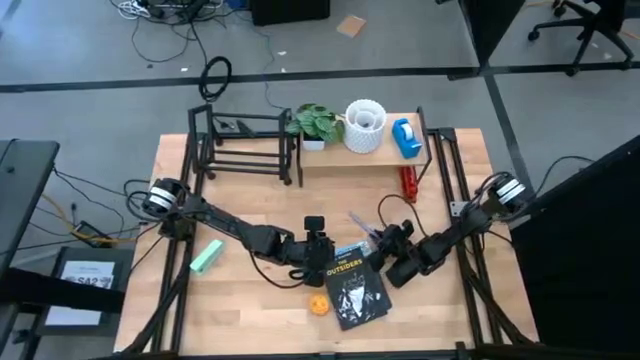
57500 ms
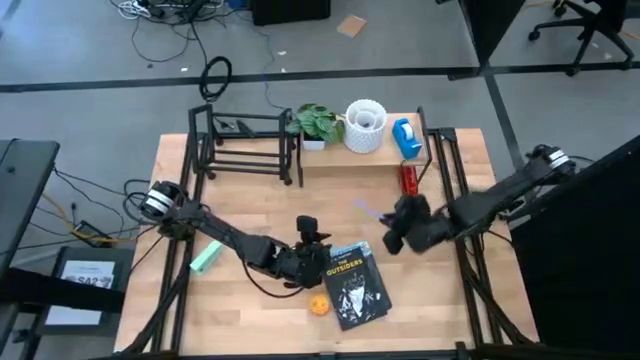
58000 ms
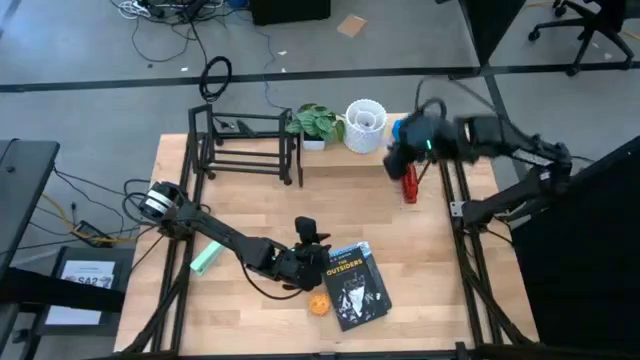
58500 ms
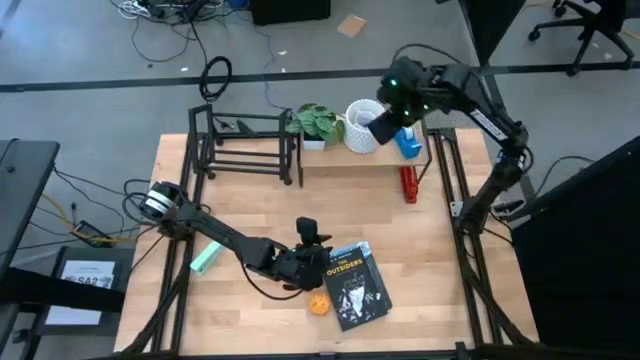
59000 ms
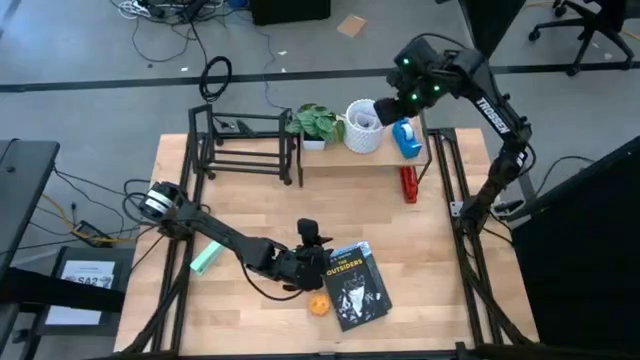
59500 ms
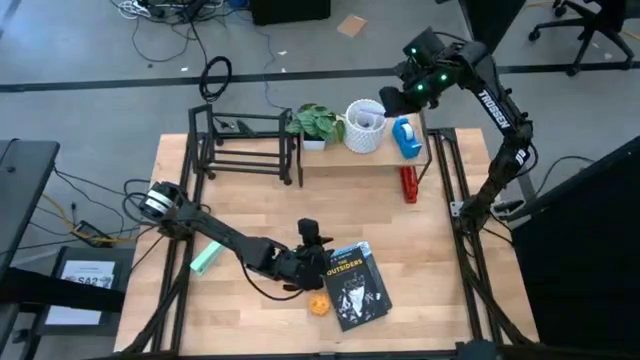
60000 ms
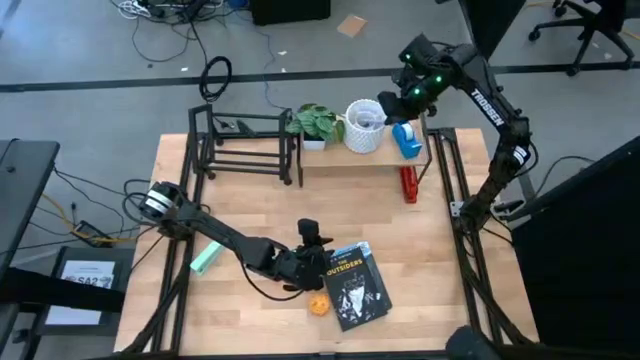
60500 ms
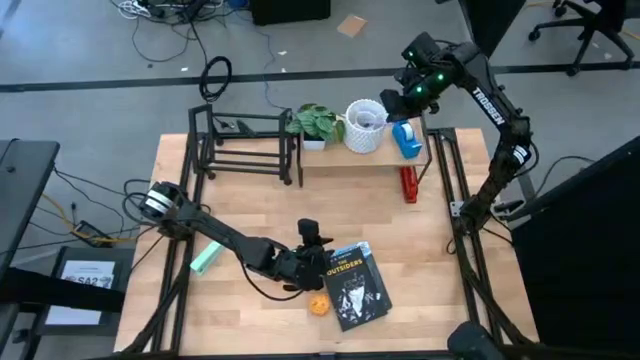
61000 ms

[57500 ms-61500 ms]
Task: Stock shelves
Put the purple pen into the white pen organizer on the shelf

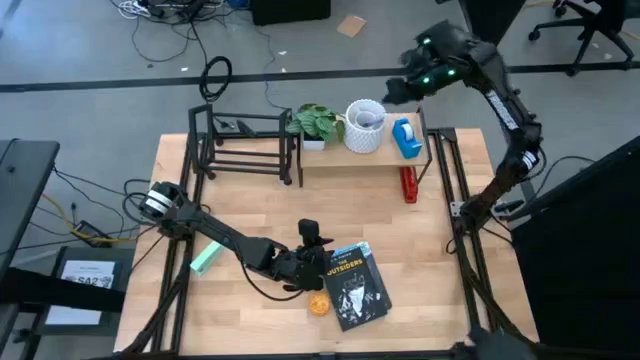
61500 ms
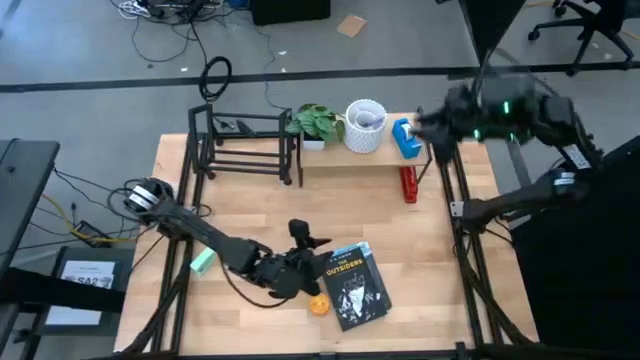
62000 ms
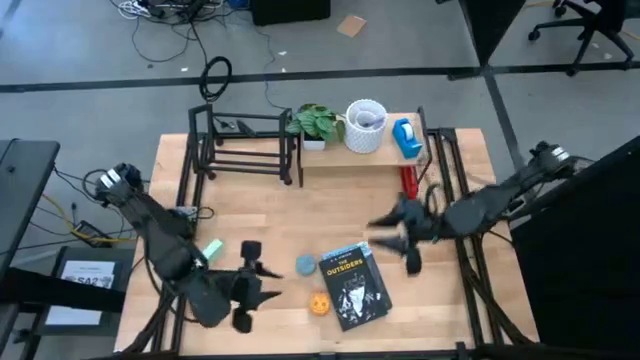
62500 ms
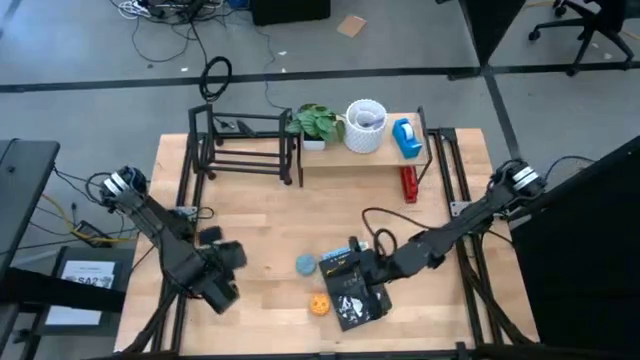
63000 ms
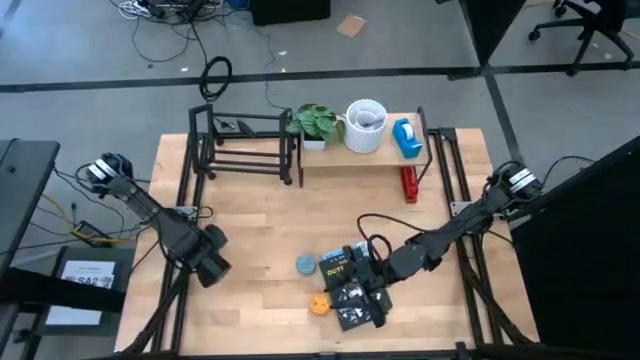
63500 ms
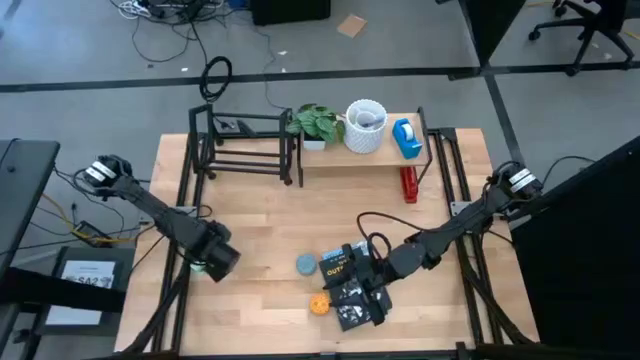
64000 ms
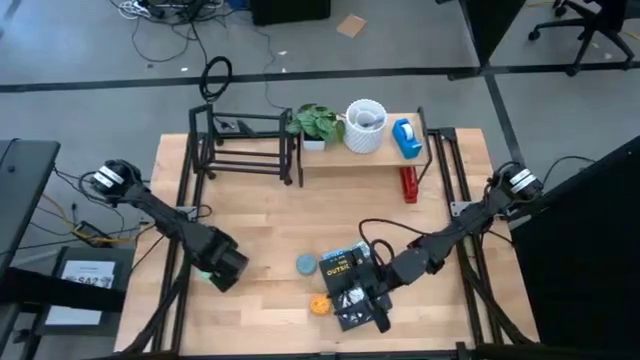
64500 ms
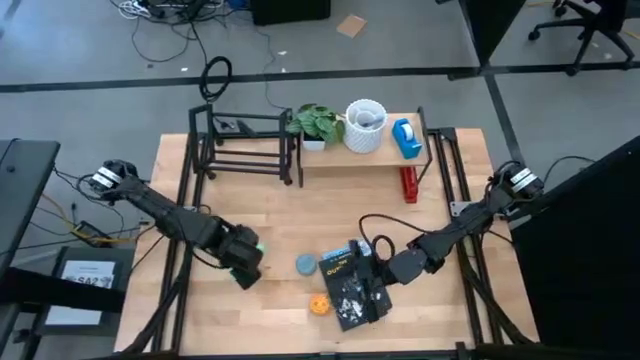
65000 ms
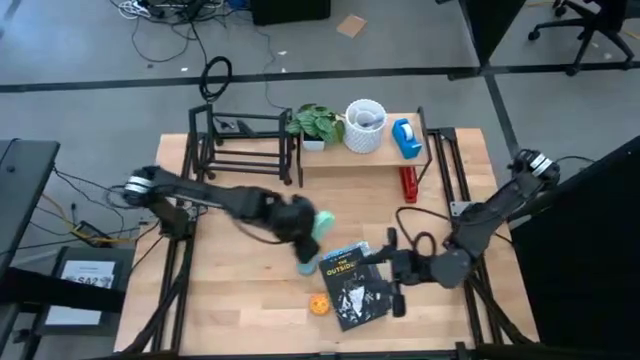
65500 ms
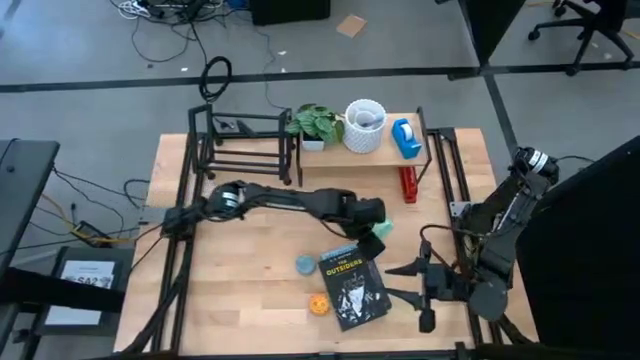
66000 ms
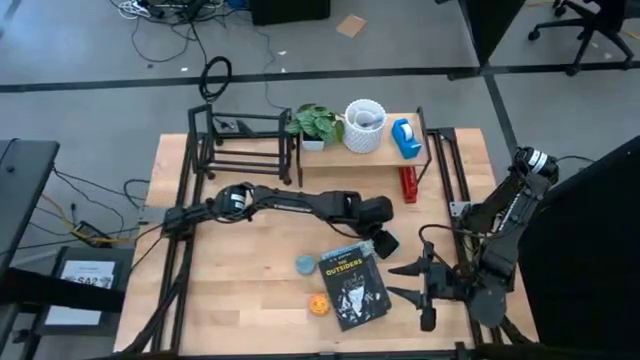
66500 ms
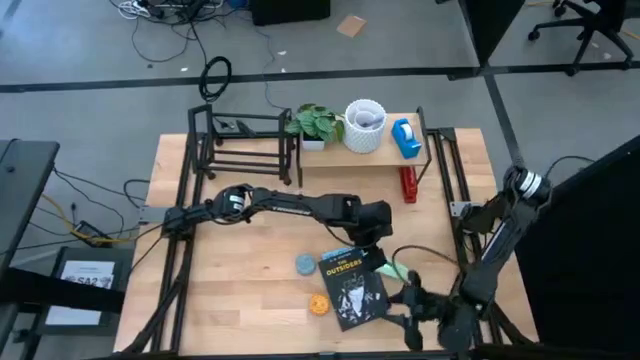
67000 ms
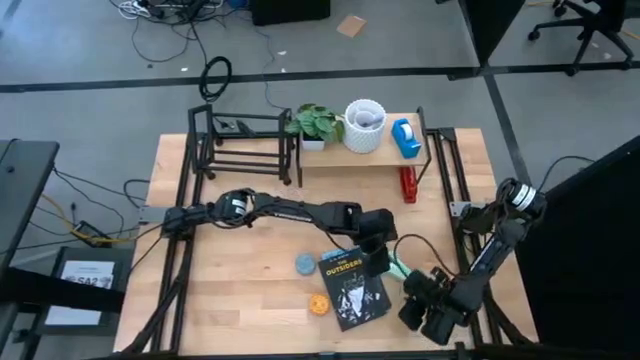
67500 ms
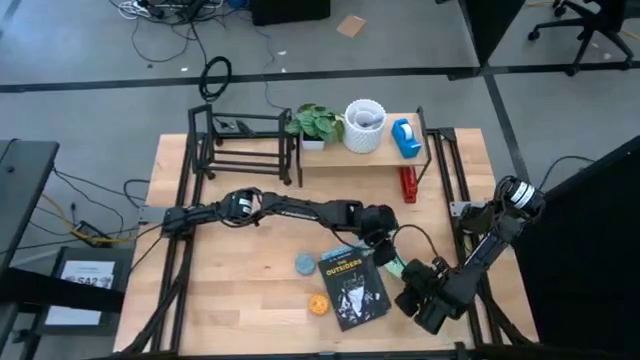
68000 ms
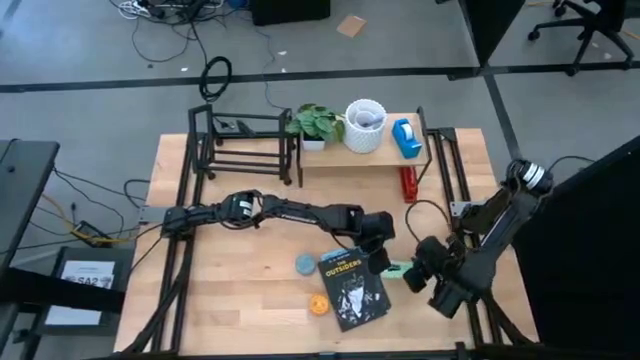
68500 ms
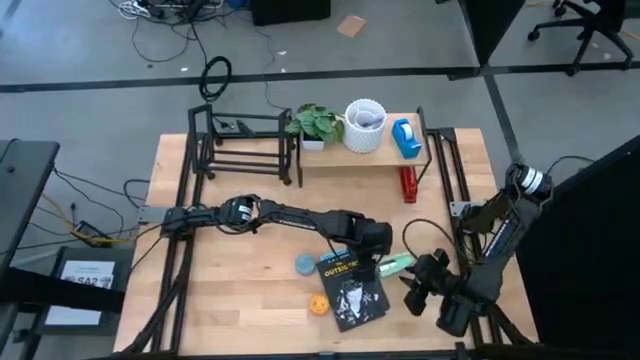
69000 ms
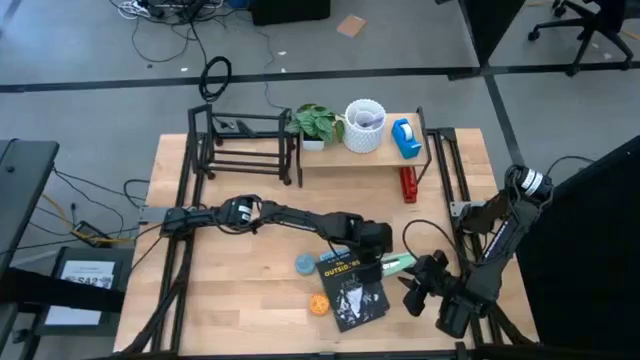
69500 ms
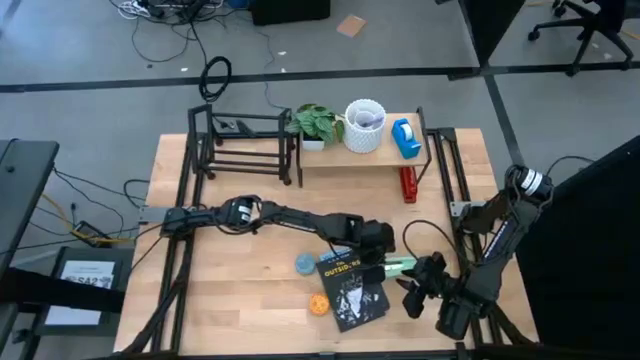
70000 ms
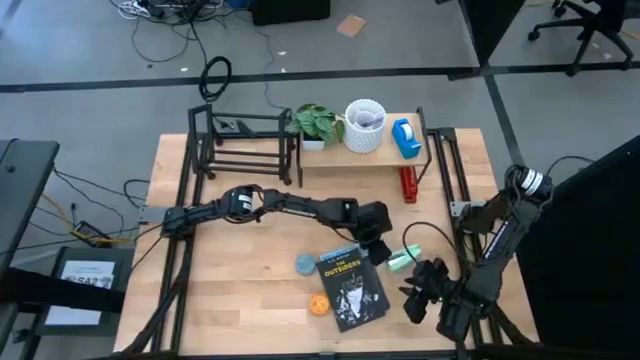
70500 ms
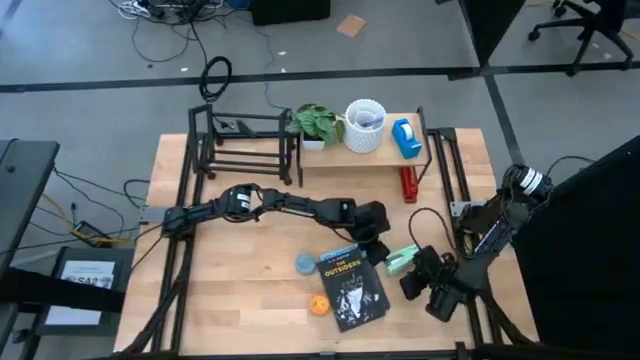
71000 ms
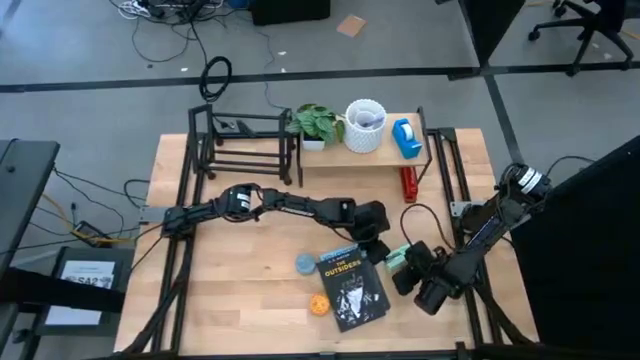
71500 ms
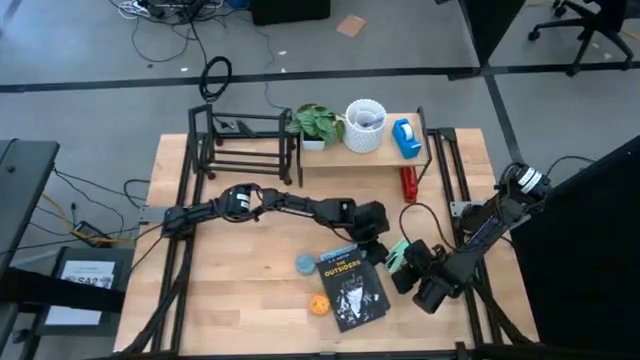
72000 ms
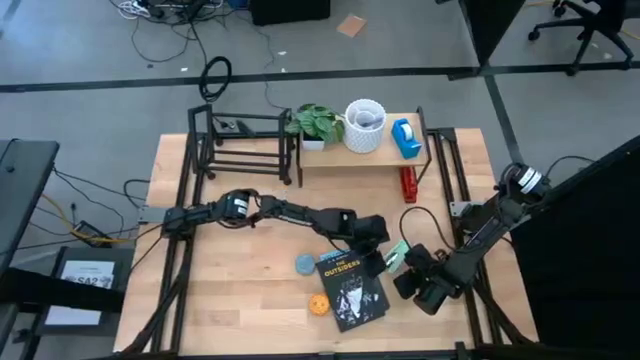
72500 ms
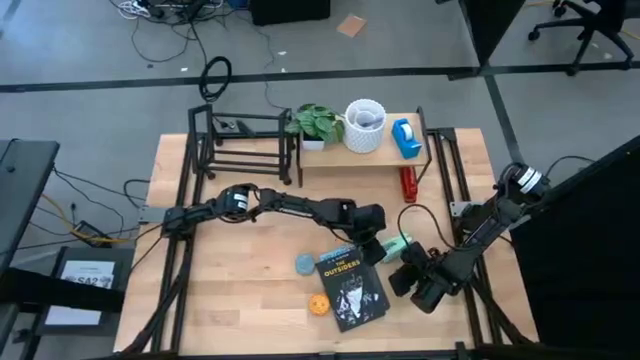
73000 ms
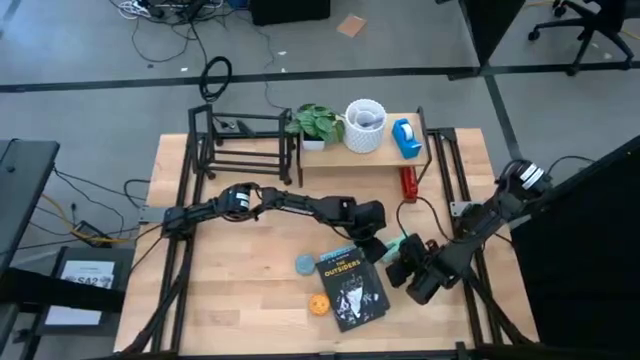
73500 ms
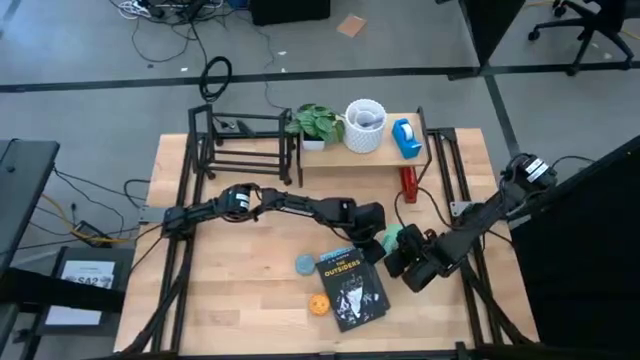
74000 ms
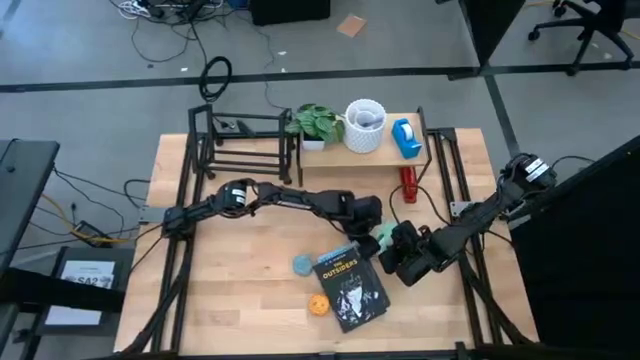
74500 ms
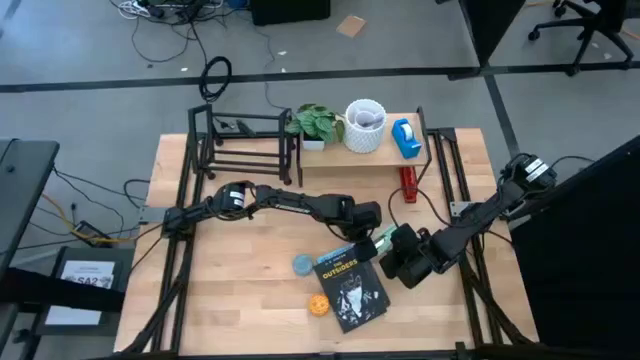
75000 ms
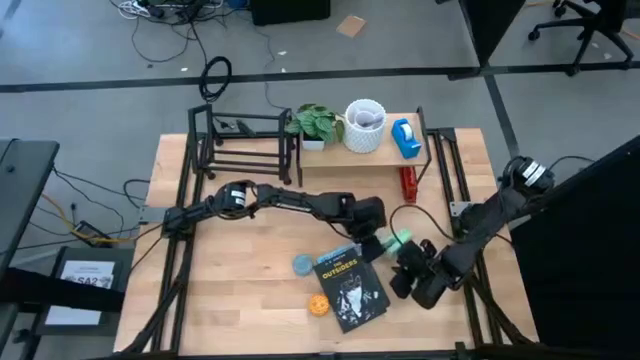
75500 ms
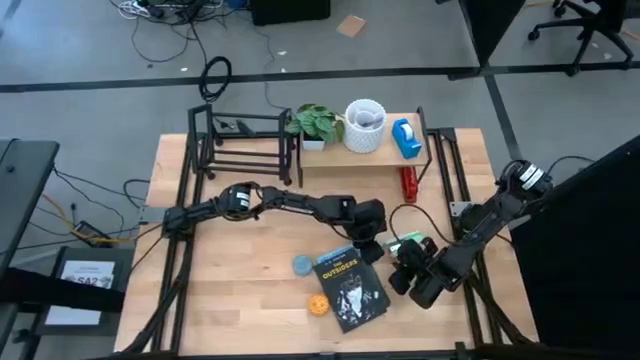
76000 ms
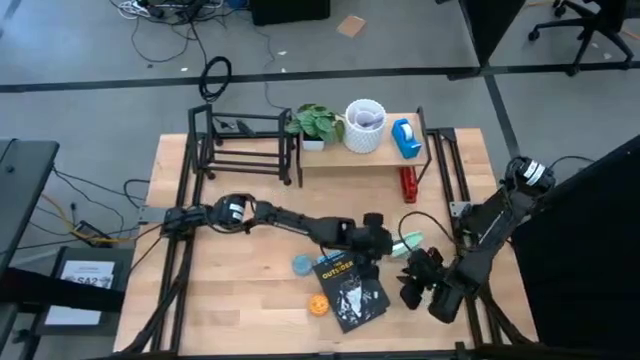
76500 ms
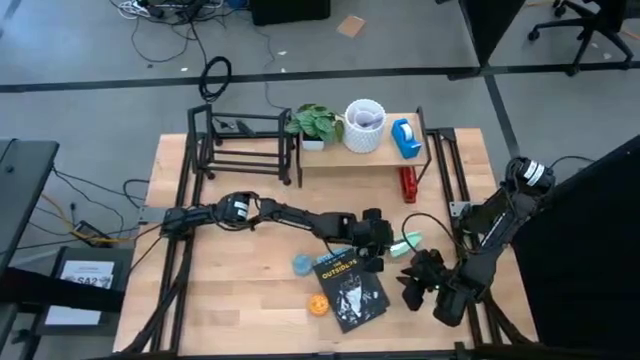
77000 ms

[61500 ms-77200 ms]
Put the green stapler under the shelf

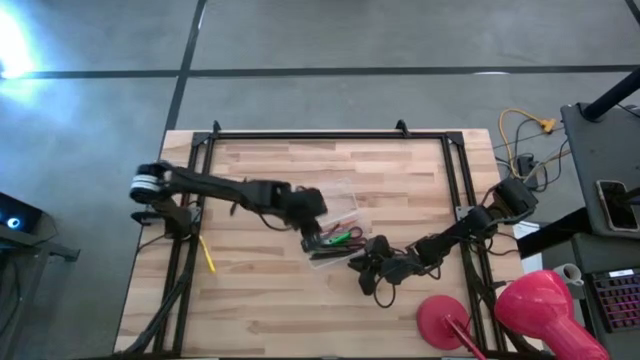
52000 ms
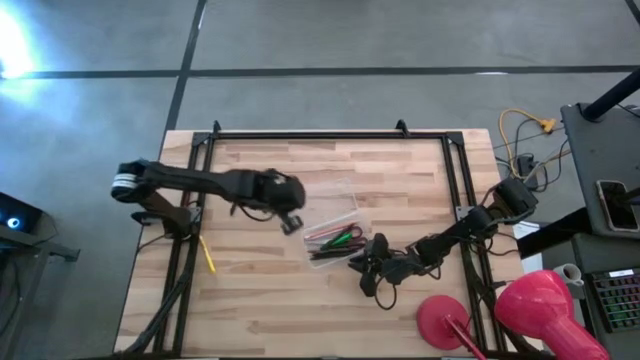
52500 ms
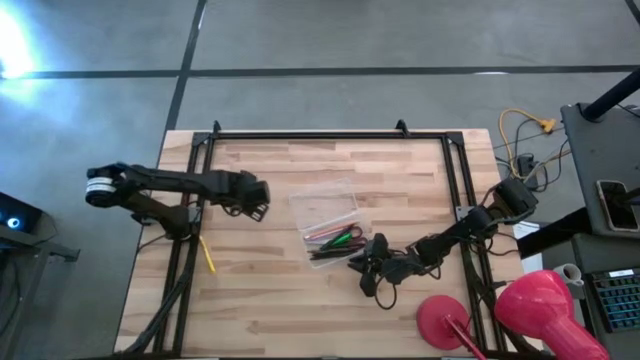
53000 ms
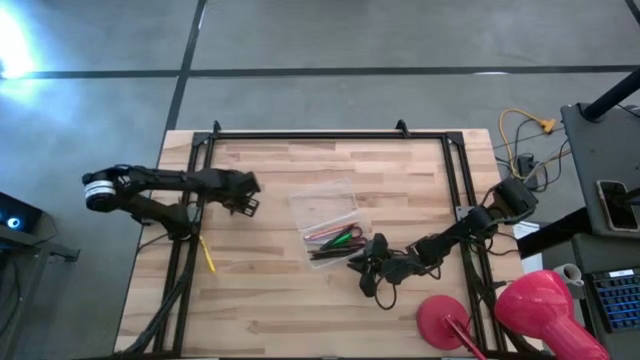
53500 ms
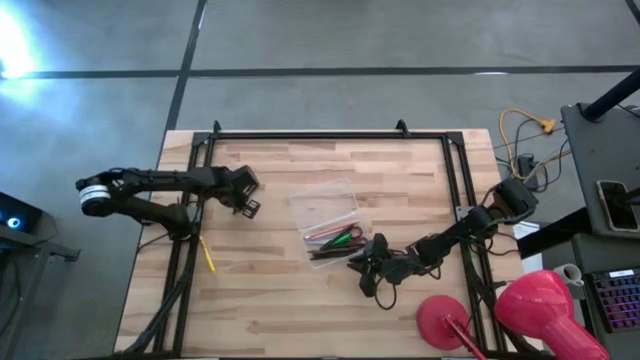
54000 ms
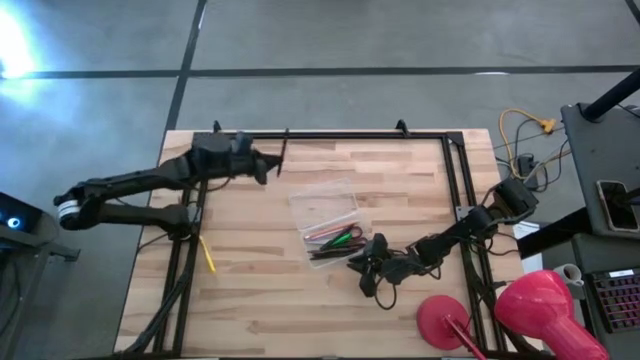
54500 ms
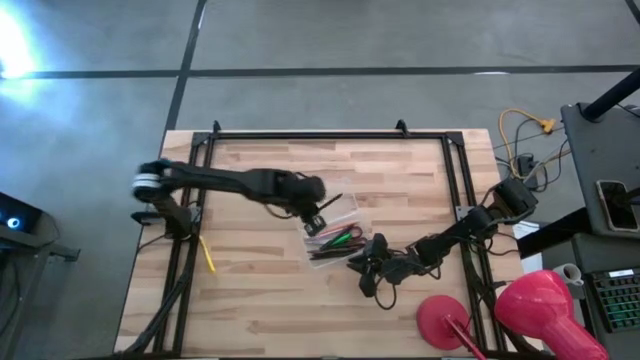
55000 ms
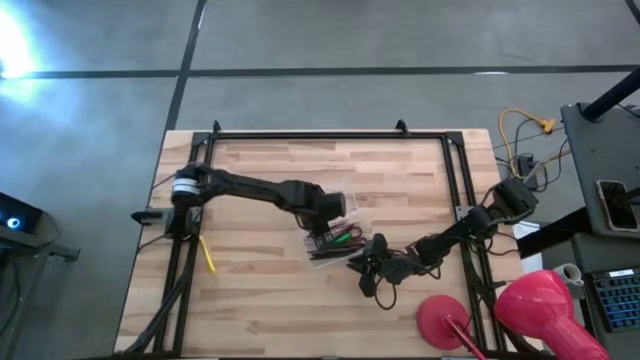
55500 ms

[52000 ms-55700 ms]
Task: Pick & place school supplies into a supply box
Put the black pen into the transparent supply box
